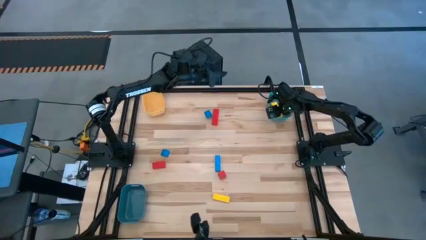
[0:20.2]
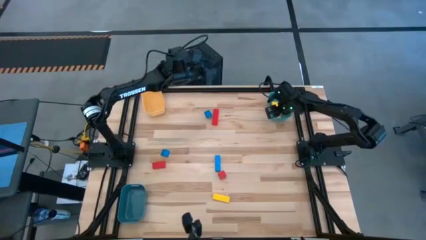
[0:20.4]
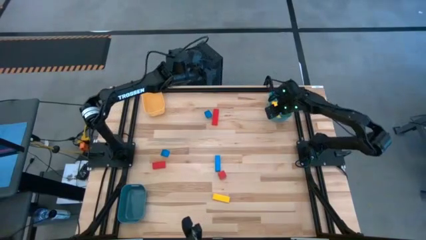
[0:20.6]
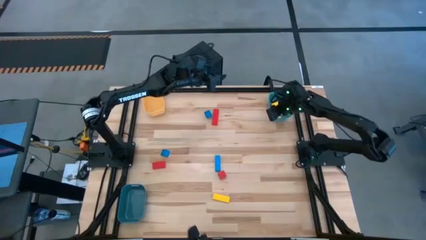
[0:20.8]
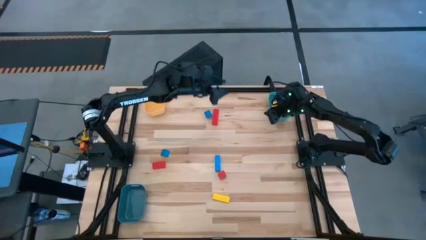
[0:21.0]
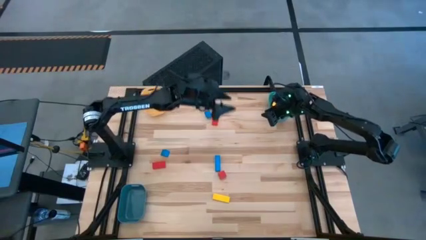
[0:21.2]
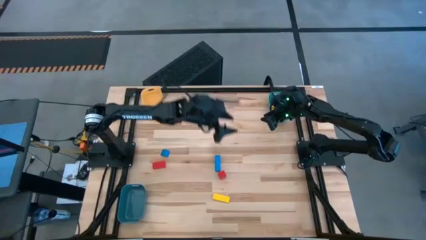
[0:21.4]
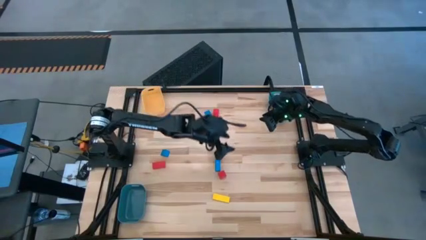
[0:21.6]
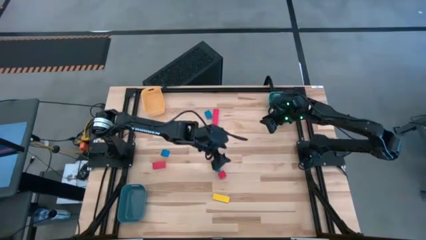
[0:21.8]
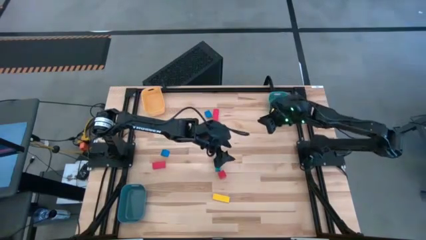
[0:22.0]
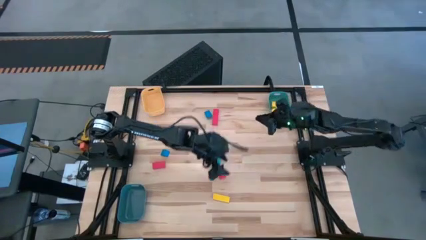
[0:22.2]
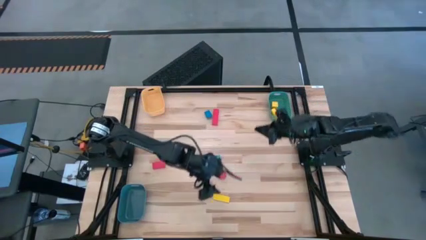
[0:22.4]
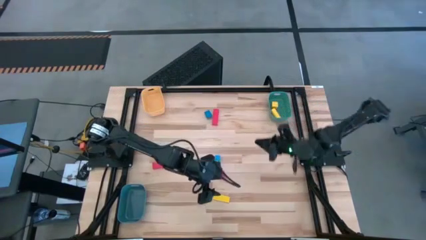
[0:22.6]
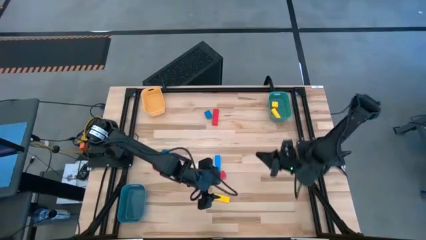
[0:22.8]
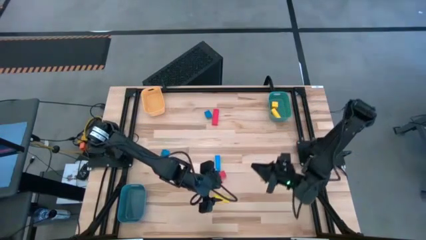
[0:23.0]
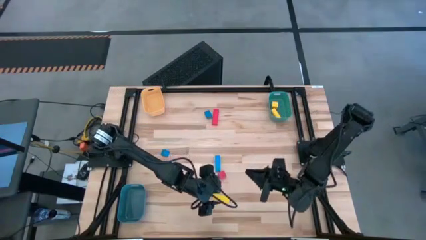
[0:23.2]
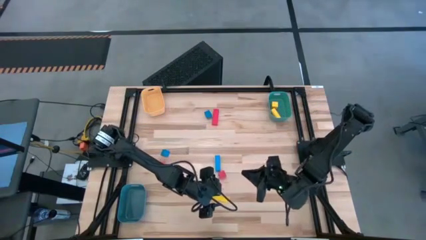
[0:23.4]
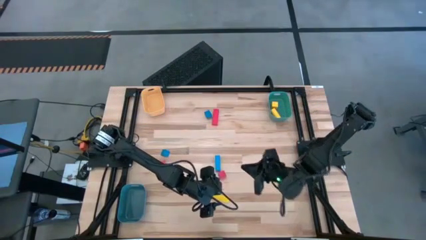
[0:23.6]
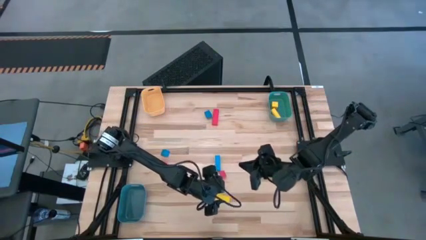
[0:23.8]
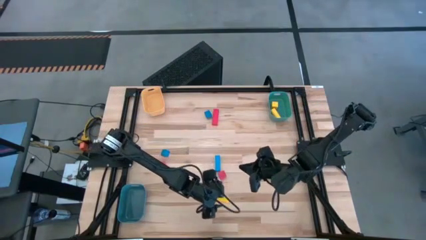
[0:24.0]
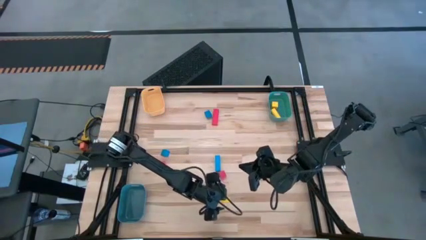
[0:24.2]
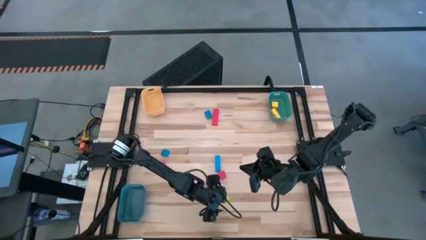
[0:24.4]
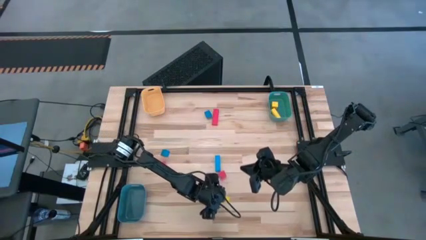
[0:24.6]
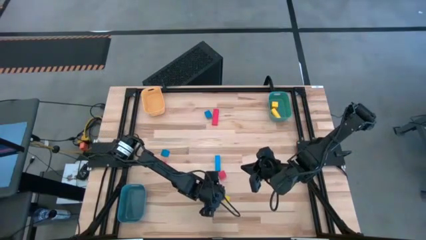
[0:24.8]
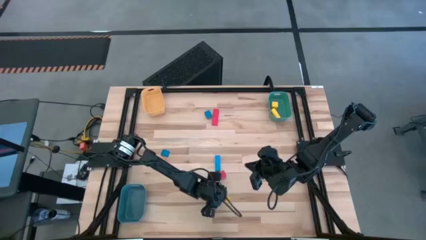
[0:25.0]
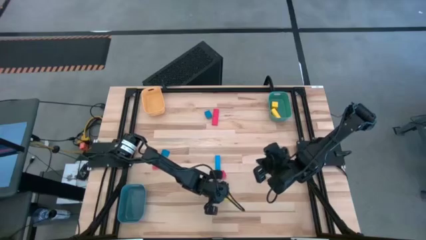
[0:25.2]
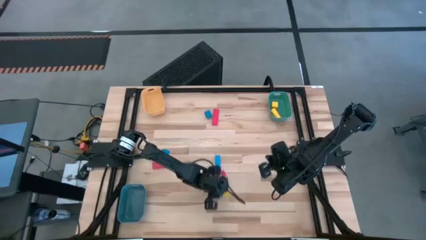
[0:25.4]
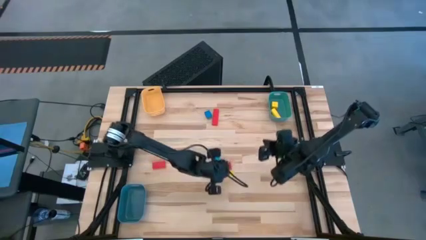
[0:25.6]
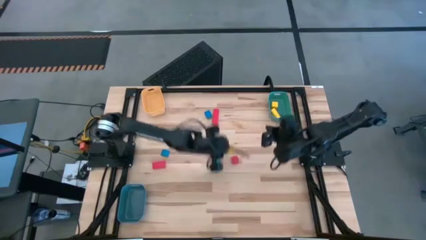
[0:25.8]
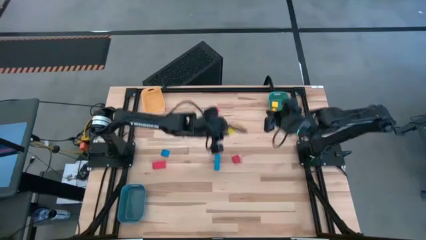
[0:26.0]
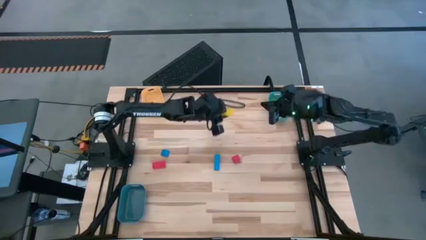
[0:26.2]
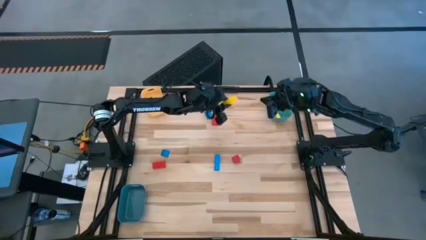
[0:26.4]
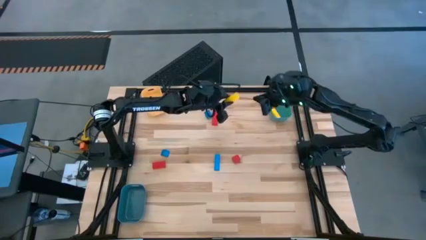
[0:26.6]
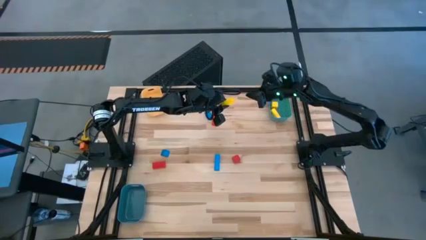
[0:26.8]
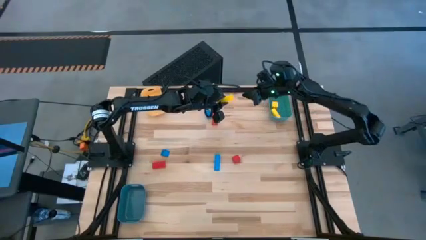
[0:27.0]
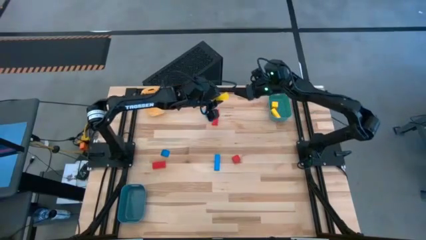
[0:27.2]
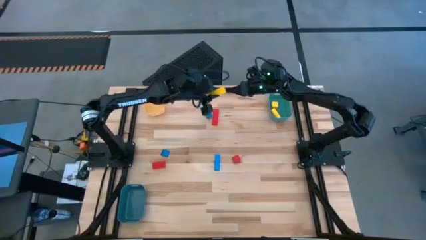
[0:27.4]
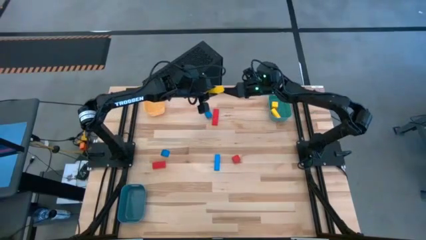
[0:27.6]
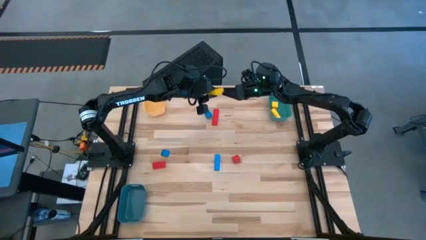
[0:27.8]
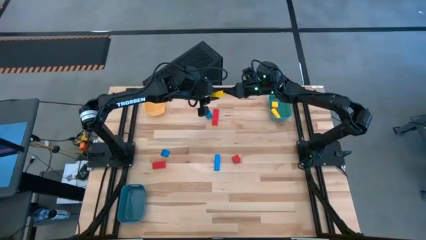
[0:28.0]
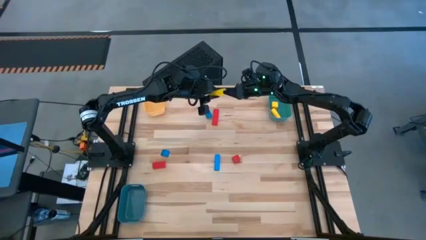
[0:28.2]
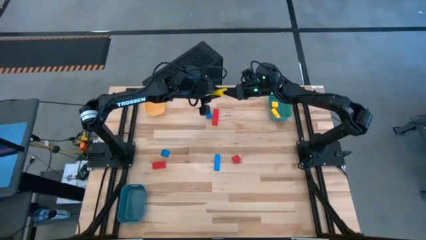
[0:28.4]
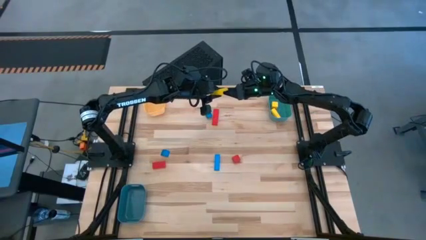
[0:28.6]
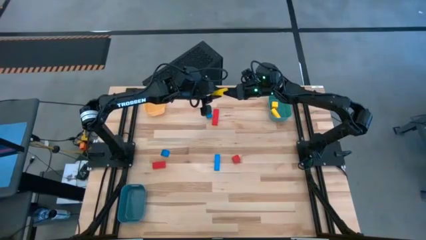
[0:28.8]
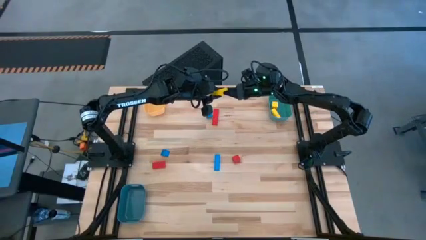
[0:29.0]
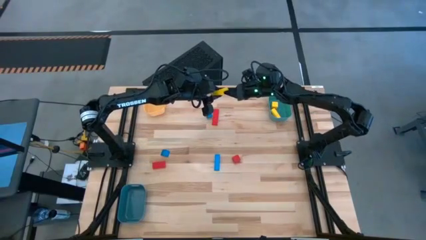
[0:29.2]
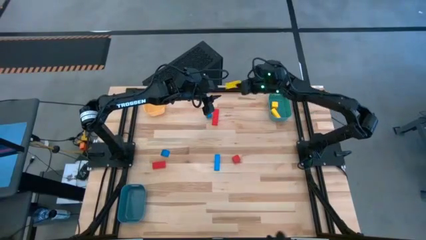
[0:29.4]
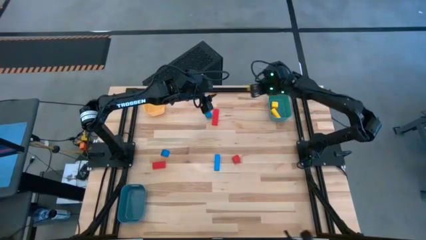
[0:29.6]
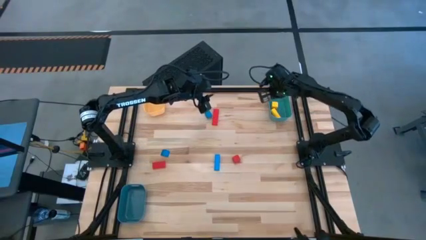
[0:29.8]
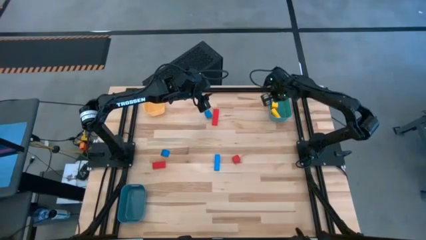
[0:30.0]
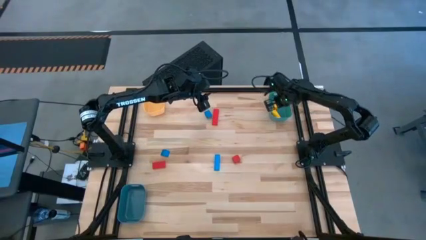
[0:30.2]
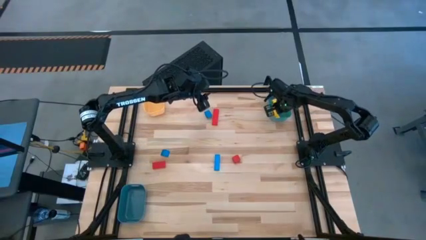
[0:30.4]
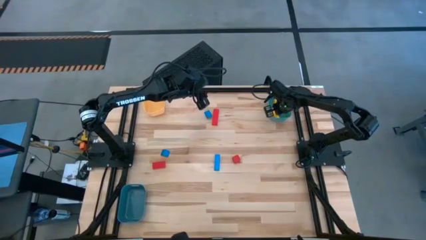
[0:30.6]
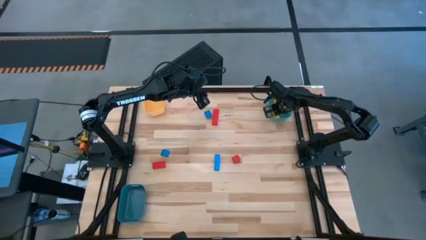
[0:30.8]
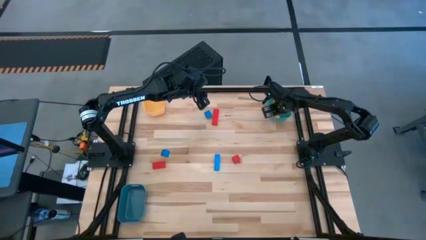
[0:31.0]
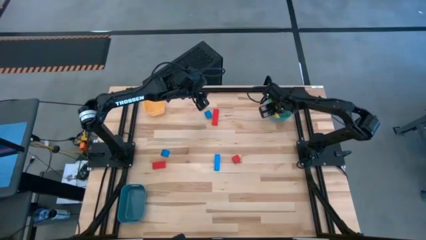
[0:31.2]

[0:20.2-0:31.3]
Task: Sort & place blocks by color
Put the yellow block into the light blue bin
